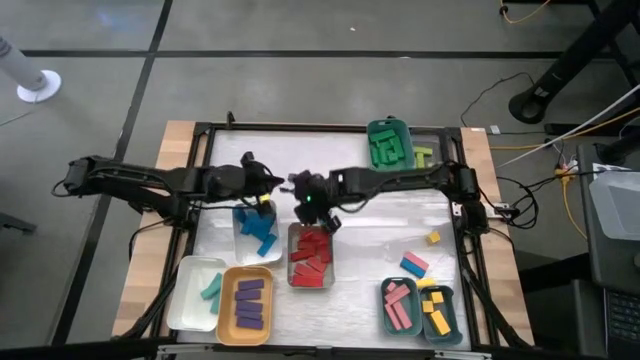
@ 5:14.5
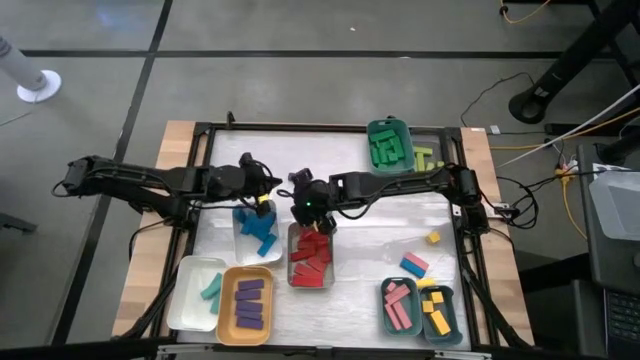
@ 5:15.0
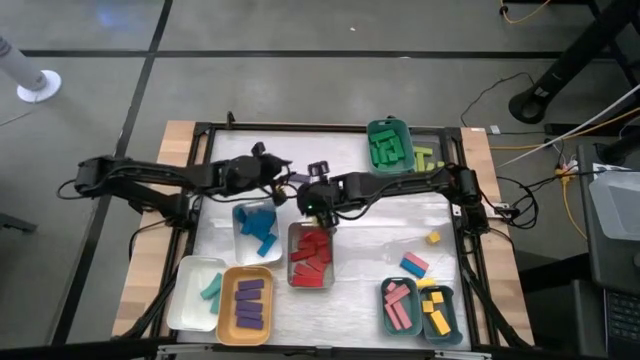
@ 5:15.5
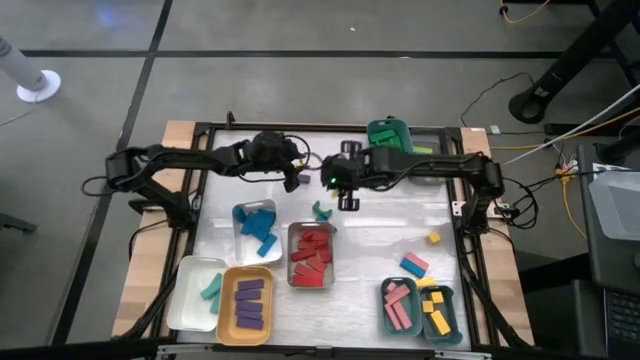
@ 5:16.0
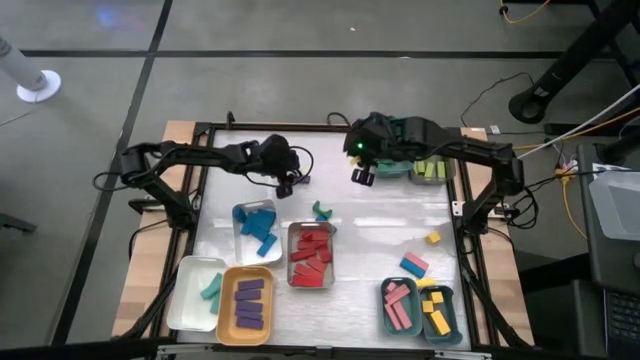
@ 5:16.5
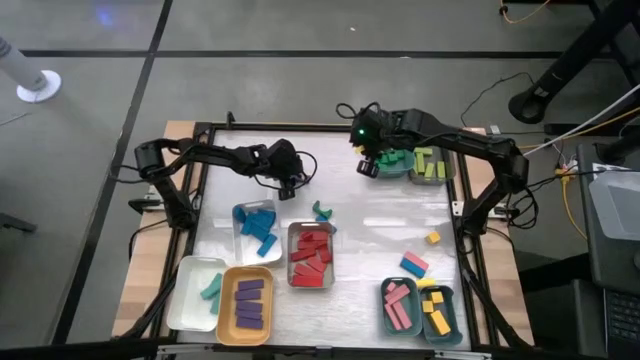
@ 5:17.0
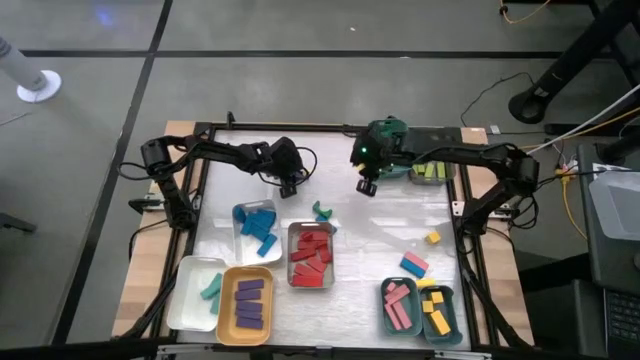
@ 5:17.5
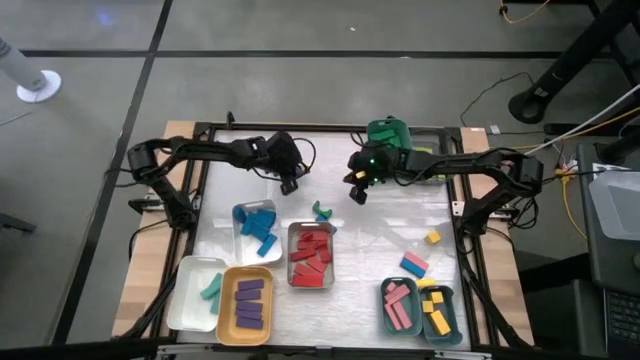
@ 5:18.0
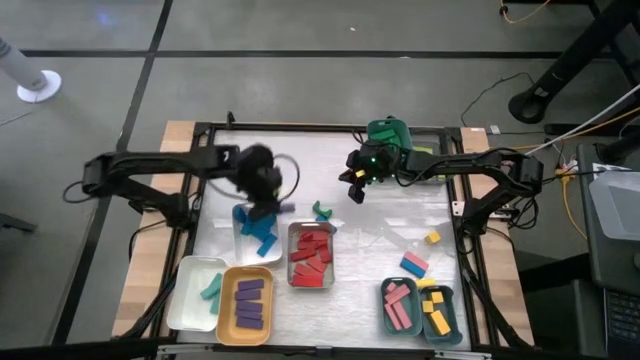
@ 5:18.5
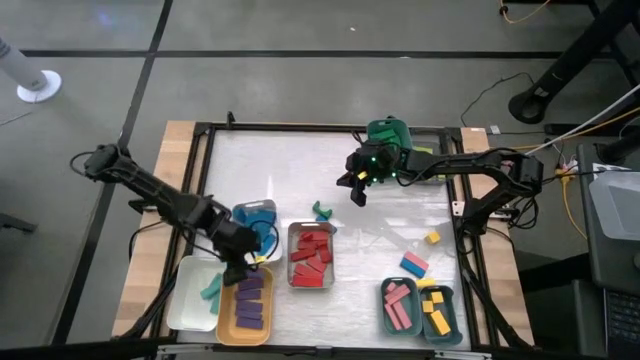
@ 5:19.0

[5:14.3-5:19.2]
Task: Sort blocks
Put the purple block into the yellow bin

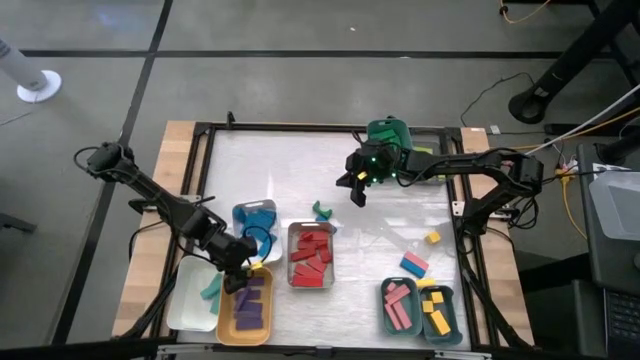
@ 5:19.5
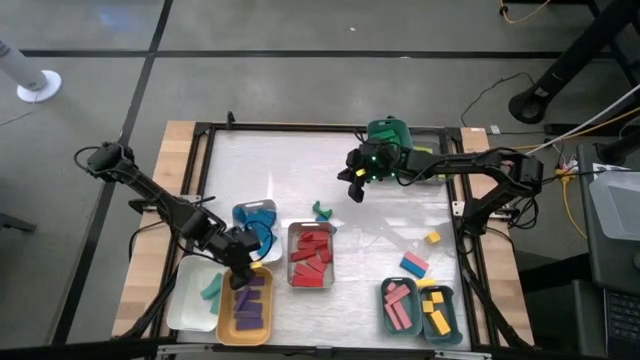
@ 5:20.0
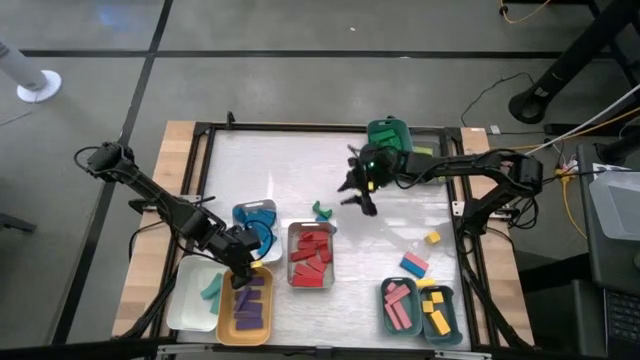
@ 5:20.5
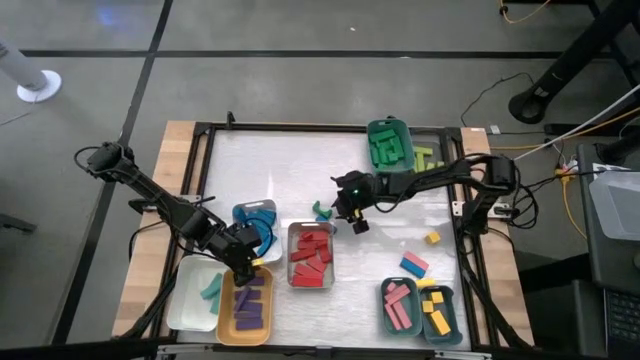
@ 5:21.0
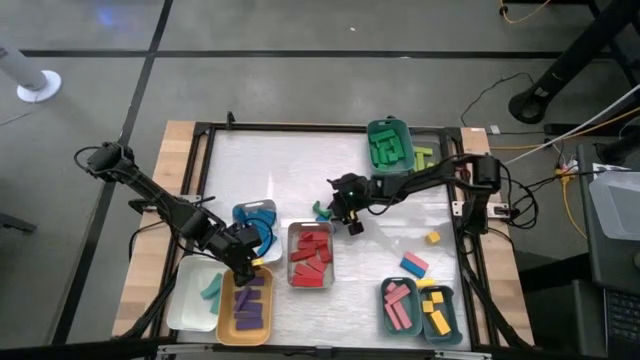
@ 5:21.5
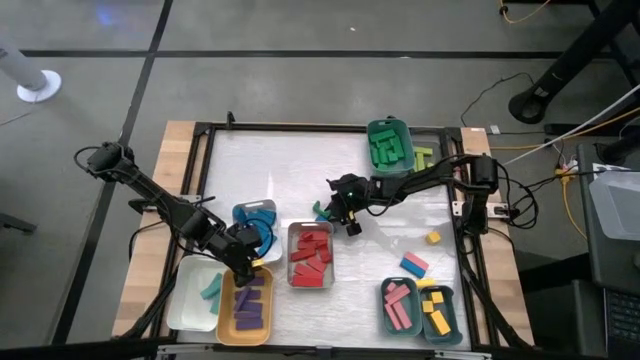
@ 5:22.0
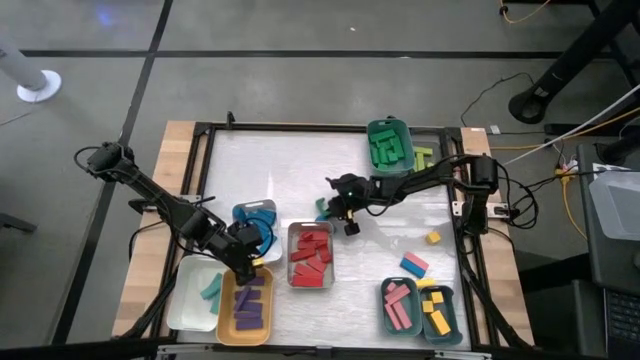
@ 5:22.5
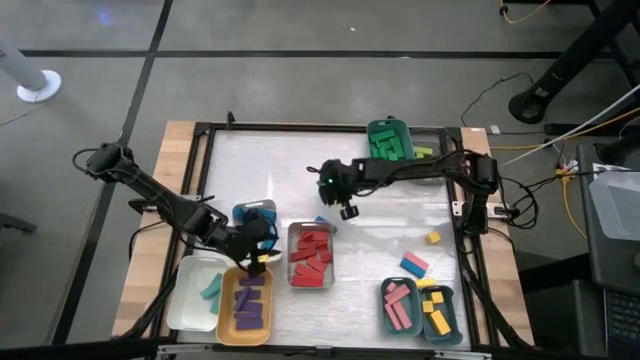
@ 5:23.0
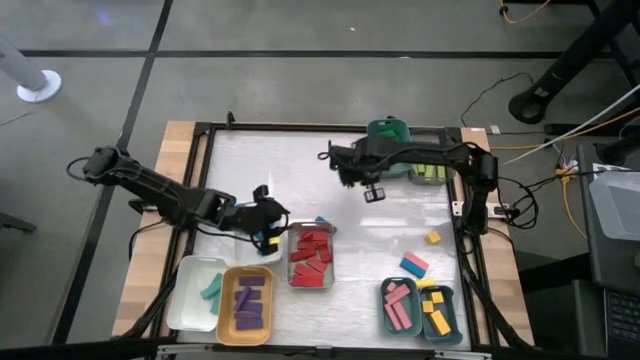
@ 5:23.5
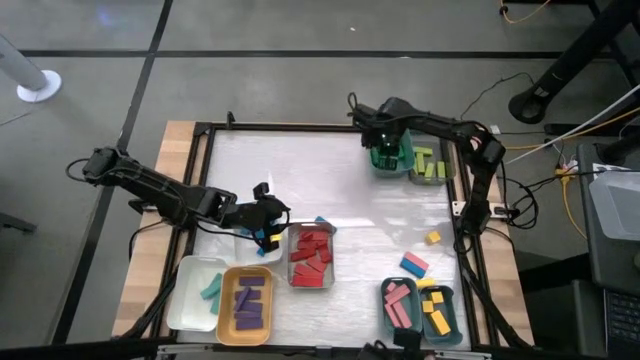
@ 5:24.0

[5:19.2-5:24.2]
Put the green block into the top green bin

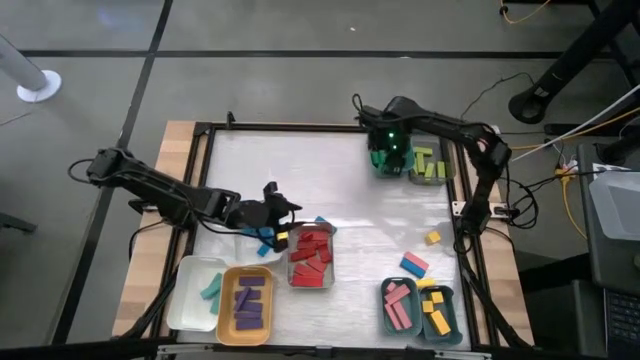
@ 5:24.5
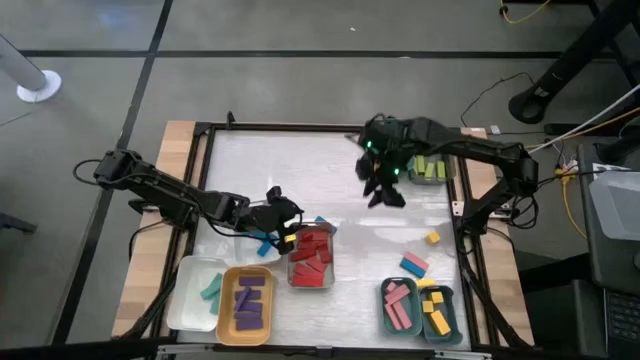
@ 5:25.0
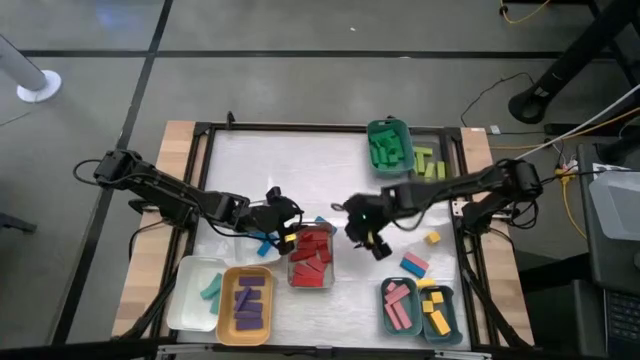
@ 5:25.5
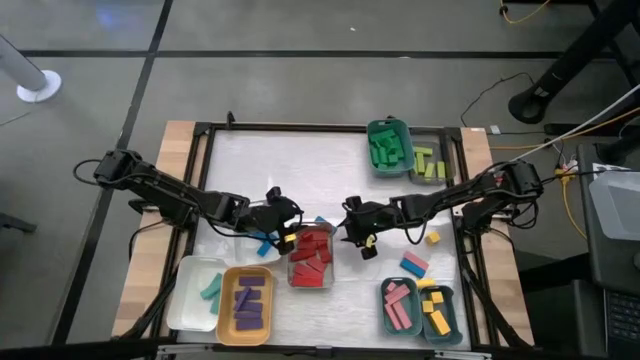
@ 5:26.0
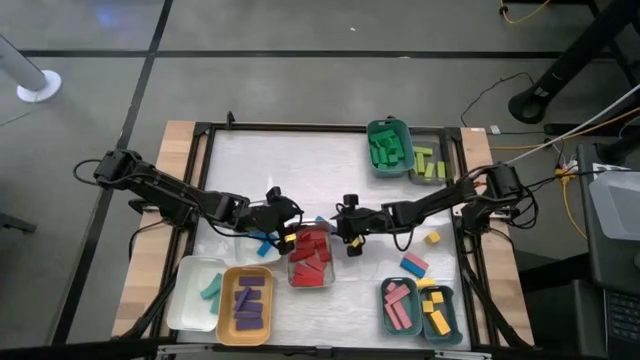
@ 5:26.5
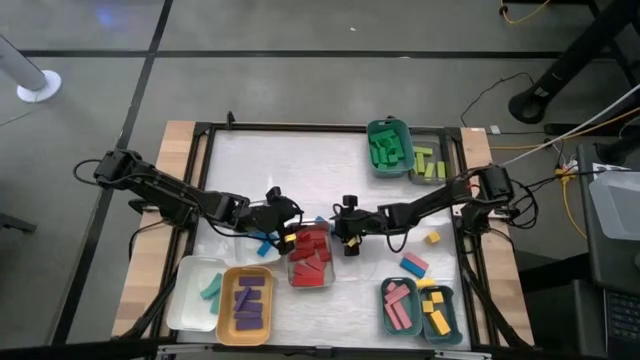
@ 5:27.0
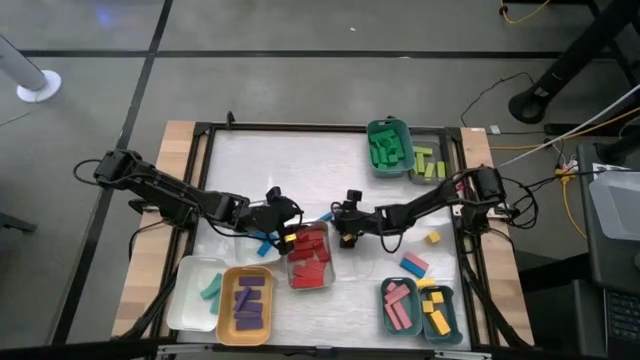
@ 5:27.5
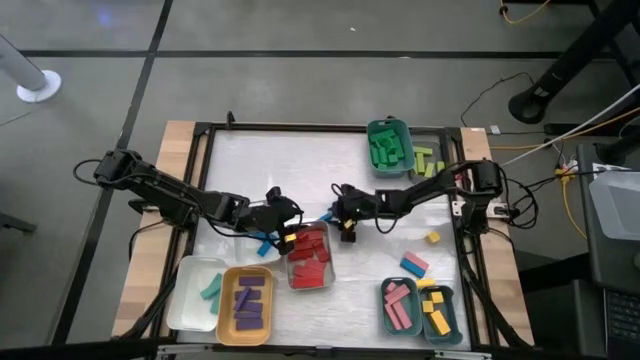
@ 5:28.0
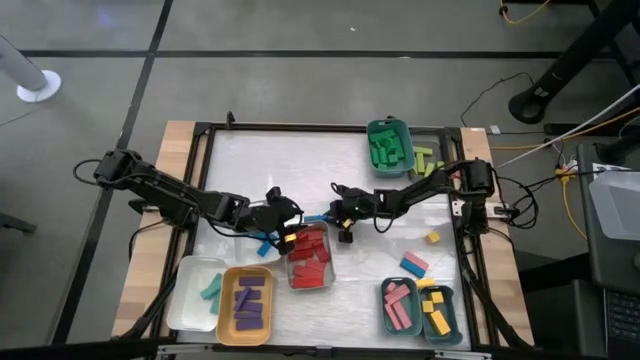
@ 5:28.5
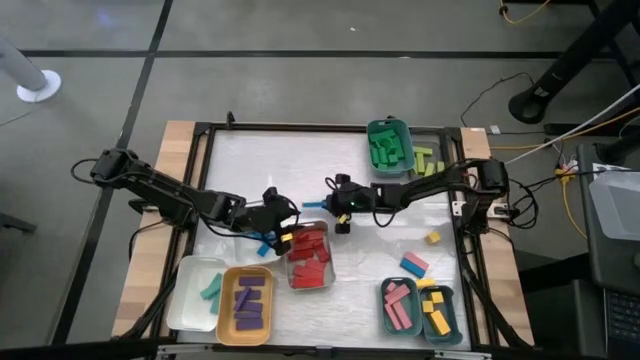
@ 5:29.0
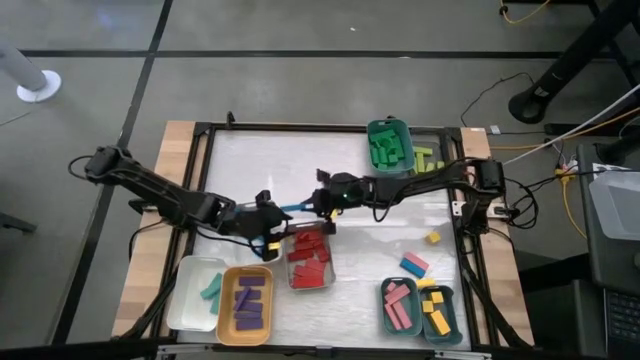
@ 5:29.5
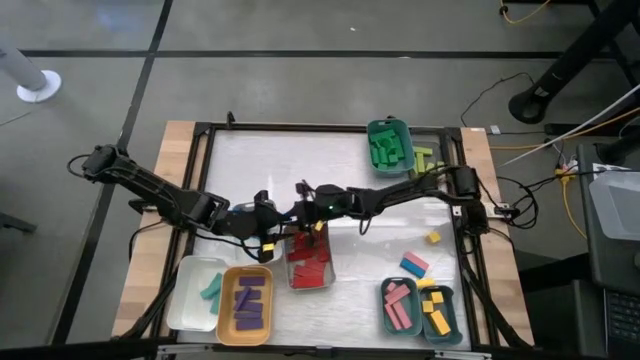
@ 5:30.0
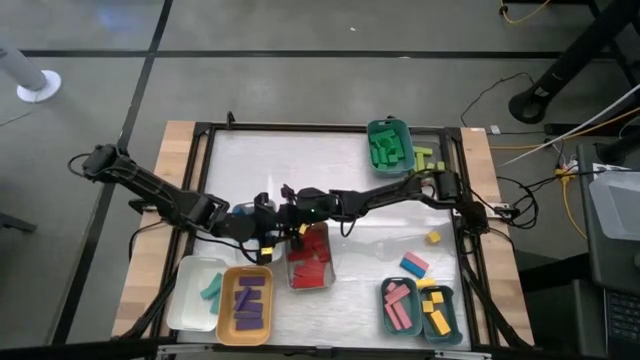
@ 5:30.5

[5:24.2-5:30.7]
Put the blue block into the top white bin

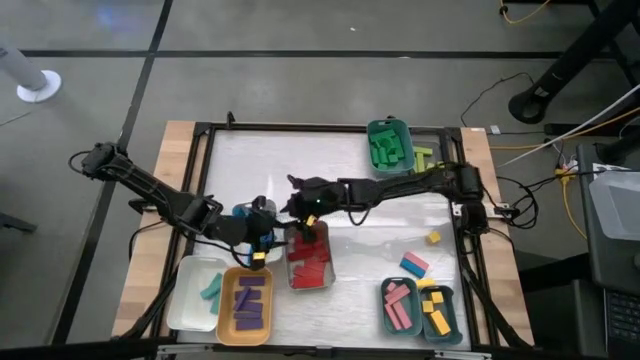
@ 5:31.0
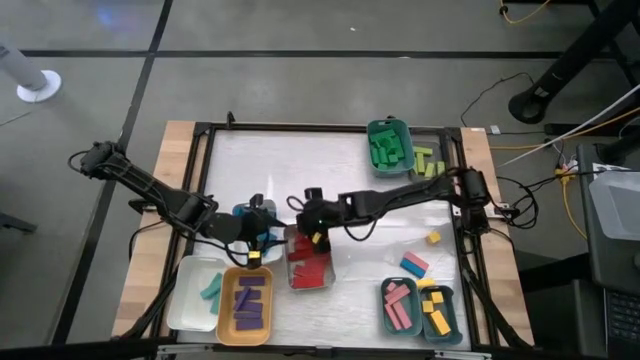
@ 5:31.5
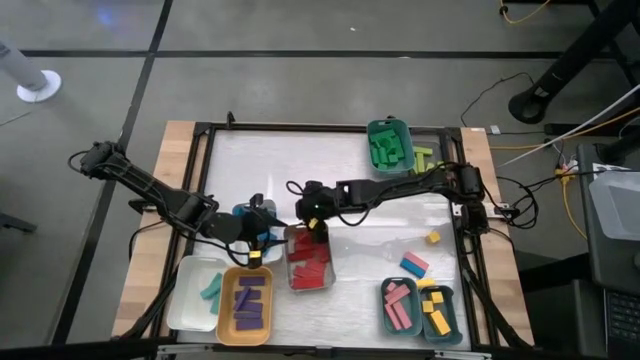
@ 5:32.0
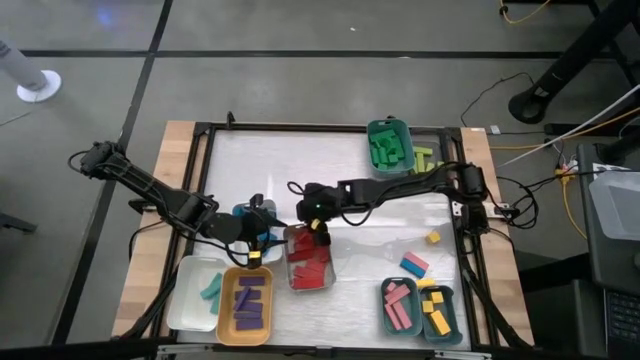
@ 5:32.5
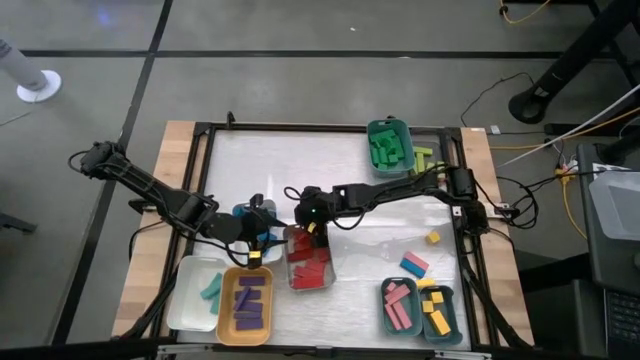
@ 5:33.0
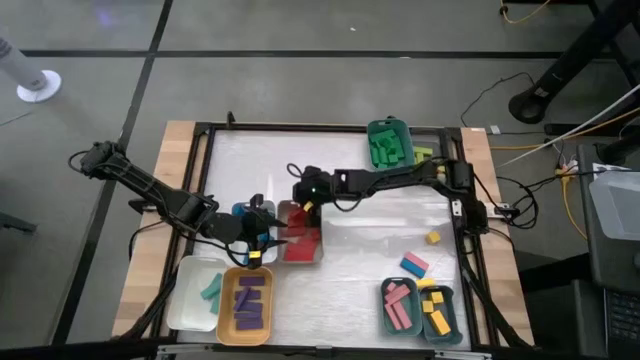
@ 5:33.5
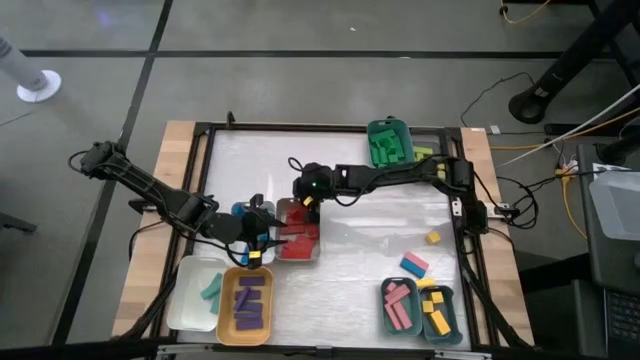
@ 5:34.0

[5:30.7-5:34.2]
Adjust the gray bin on the table

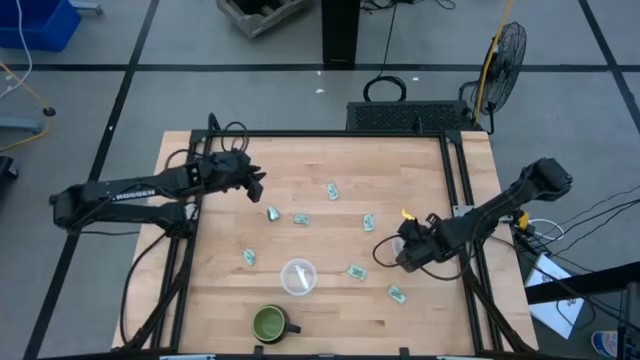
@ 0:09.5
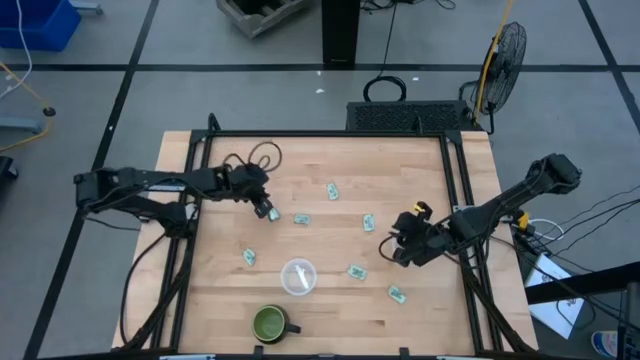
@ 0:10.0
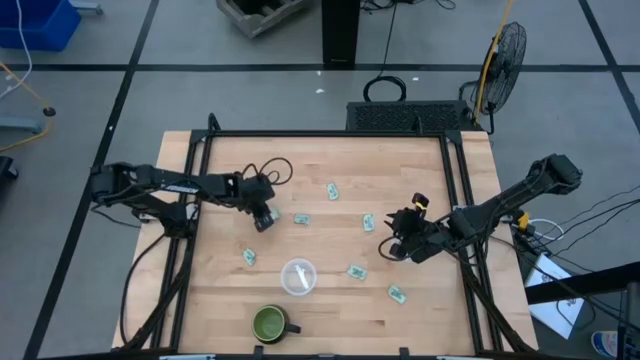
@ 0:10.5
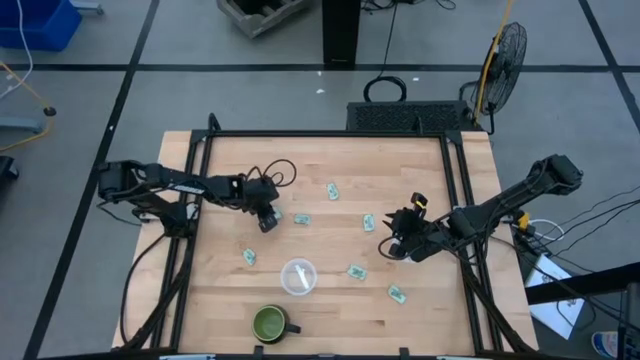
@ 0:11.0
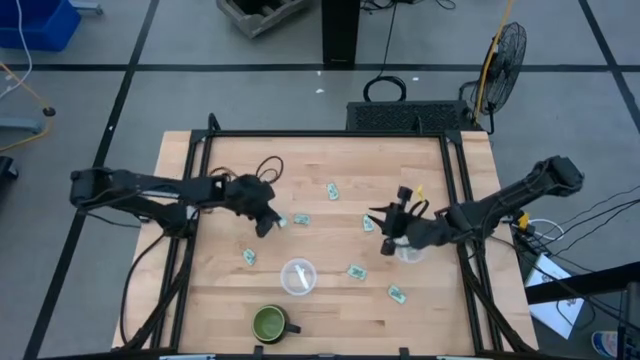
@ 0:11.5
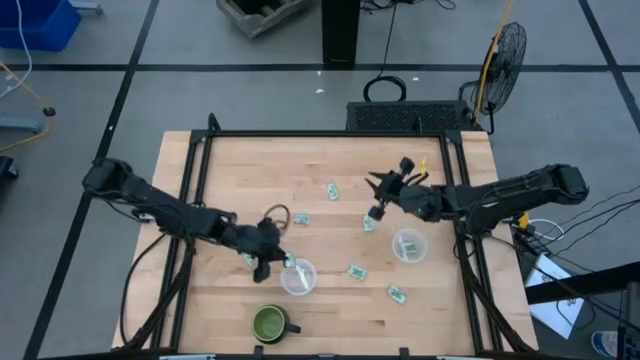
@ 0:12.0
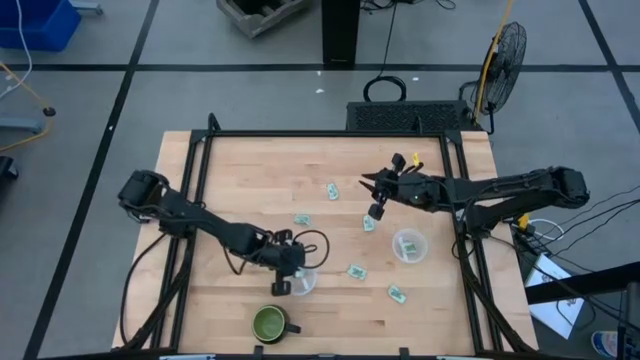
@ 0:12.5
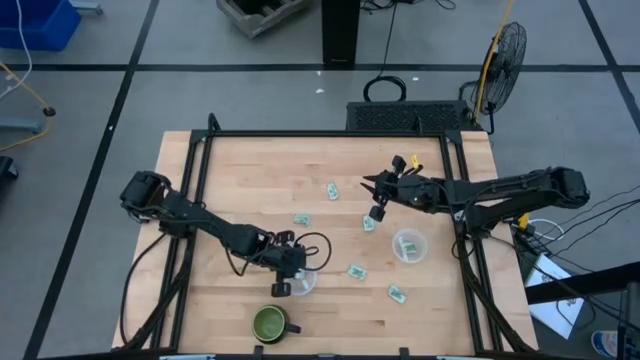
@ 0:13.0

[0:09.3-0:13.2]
Task: Pick and place Stevia / Truvia into bins
Put the green stevia packet into the left transparent container
